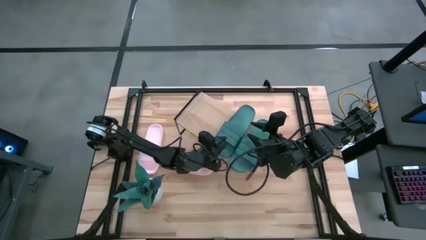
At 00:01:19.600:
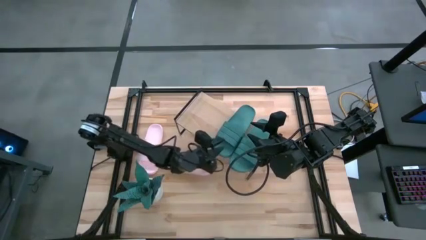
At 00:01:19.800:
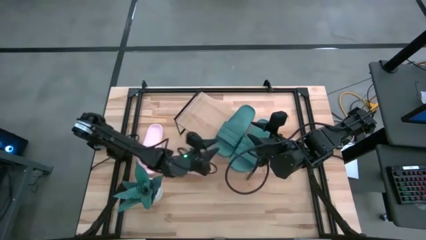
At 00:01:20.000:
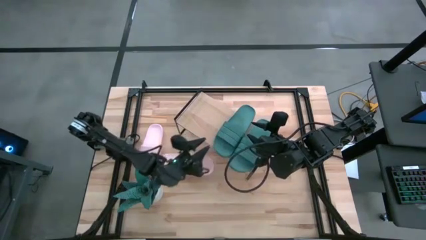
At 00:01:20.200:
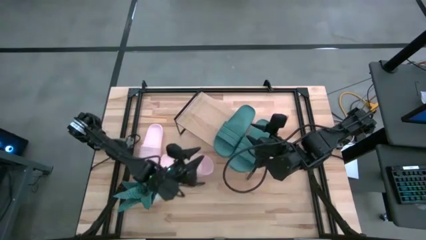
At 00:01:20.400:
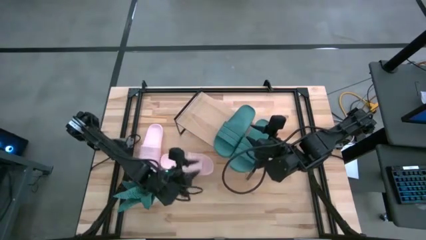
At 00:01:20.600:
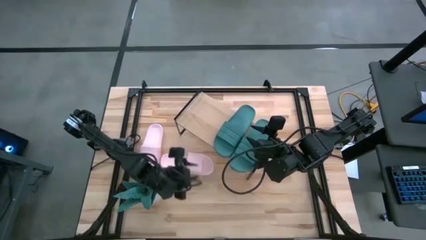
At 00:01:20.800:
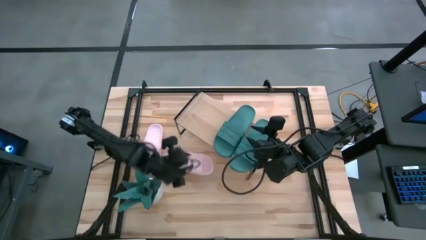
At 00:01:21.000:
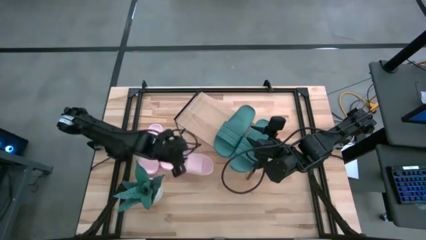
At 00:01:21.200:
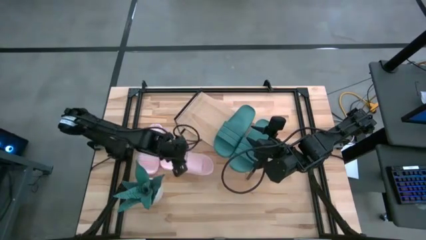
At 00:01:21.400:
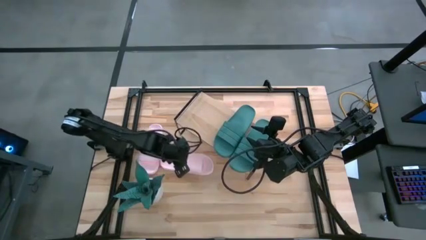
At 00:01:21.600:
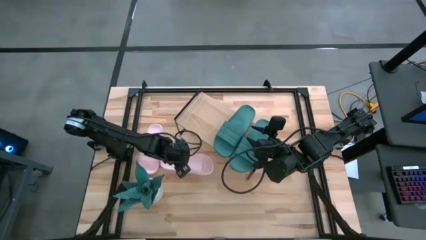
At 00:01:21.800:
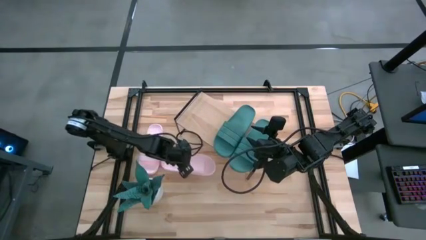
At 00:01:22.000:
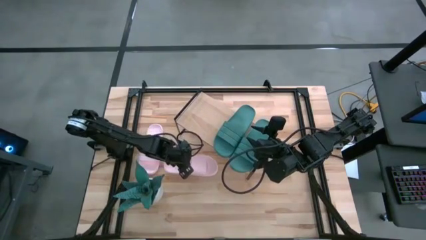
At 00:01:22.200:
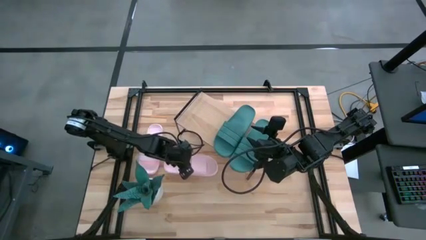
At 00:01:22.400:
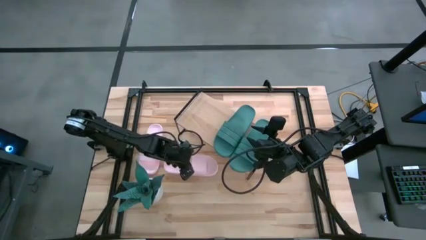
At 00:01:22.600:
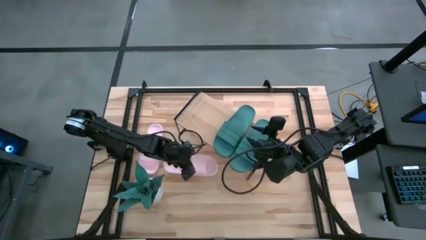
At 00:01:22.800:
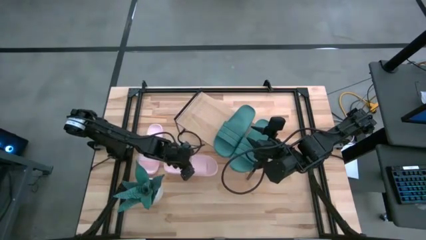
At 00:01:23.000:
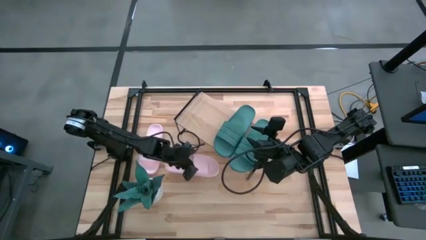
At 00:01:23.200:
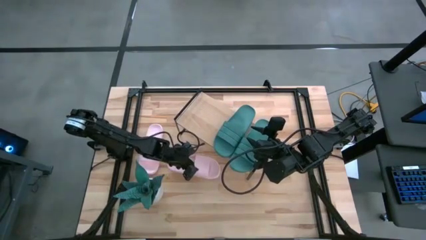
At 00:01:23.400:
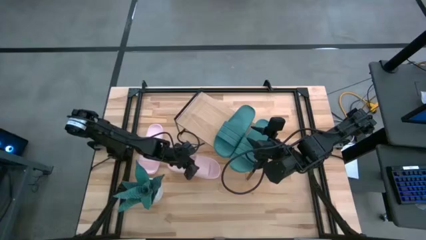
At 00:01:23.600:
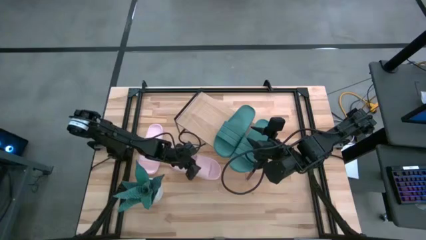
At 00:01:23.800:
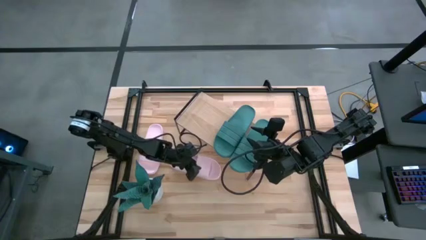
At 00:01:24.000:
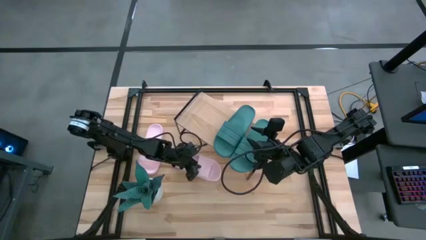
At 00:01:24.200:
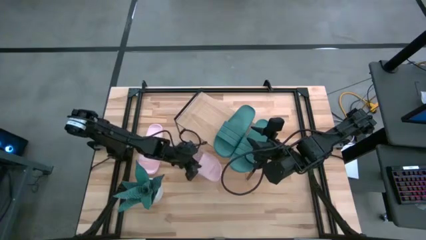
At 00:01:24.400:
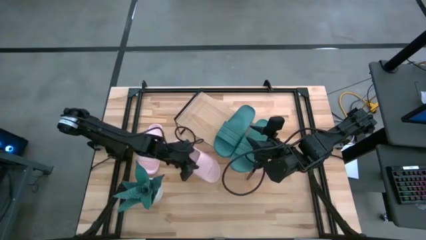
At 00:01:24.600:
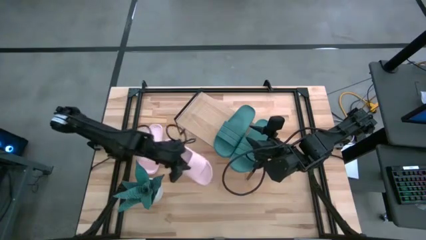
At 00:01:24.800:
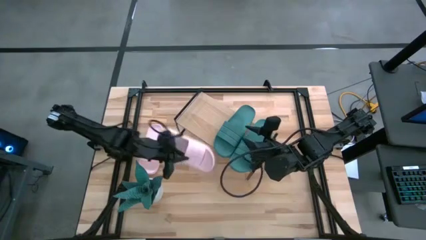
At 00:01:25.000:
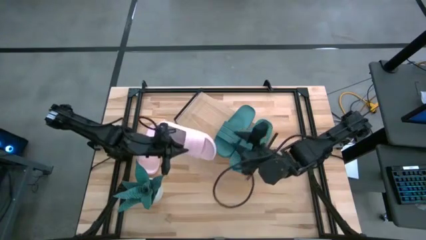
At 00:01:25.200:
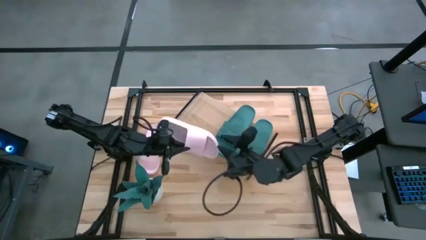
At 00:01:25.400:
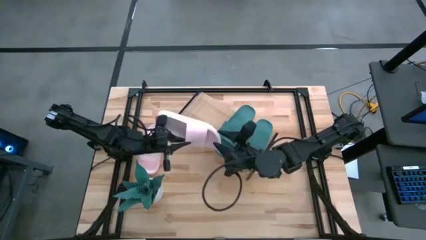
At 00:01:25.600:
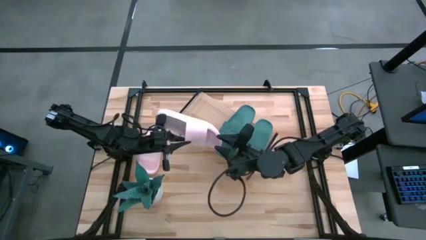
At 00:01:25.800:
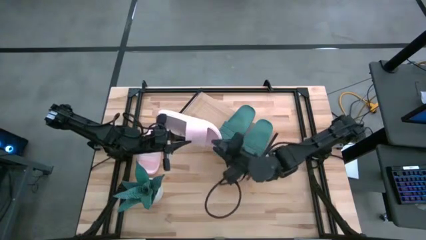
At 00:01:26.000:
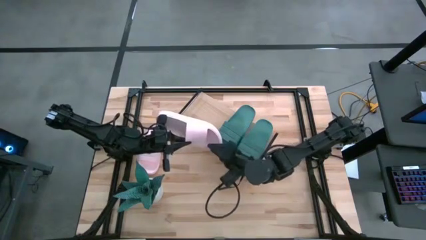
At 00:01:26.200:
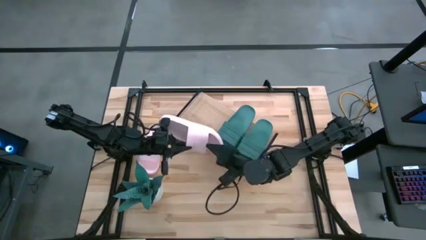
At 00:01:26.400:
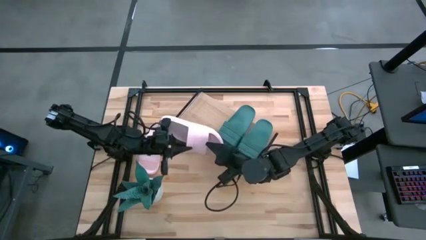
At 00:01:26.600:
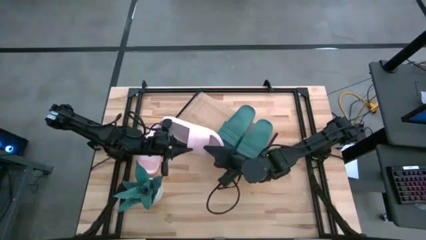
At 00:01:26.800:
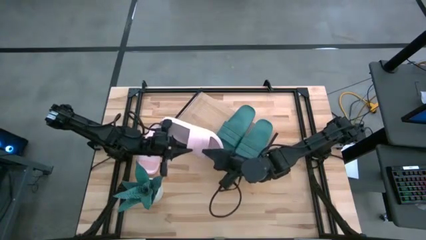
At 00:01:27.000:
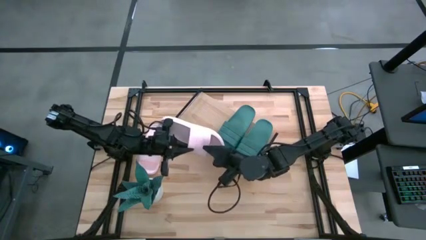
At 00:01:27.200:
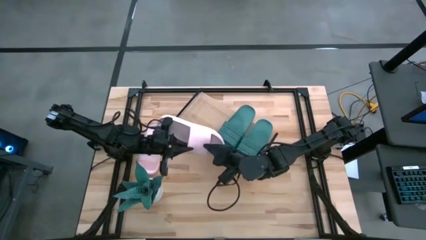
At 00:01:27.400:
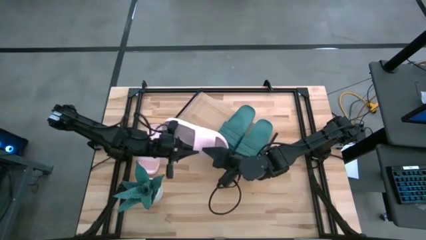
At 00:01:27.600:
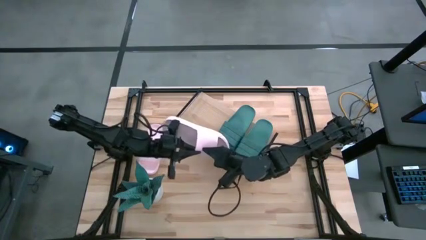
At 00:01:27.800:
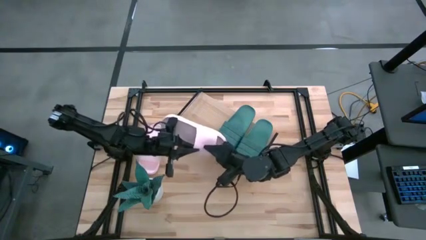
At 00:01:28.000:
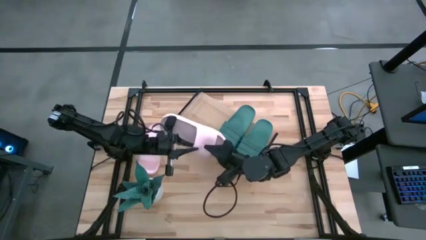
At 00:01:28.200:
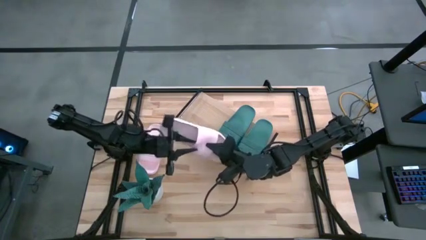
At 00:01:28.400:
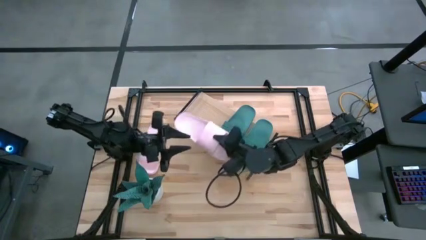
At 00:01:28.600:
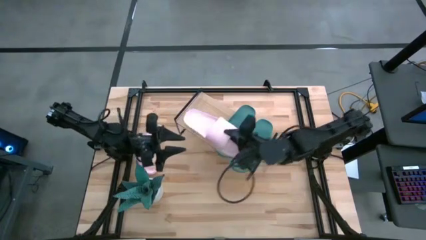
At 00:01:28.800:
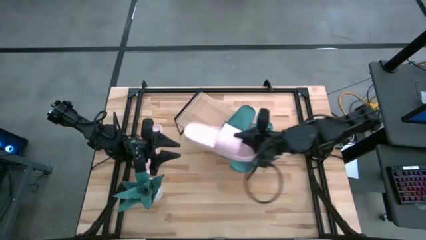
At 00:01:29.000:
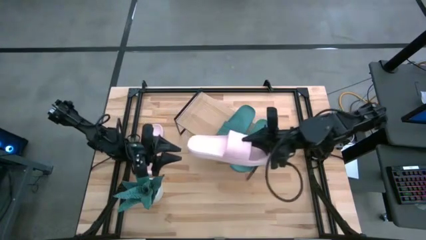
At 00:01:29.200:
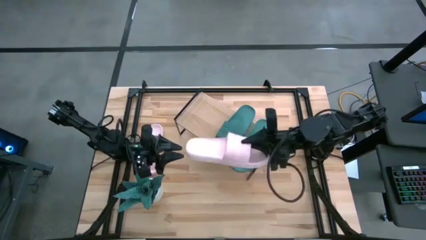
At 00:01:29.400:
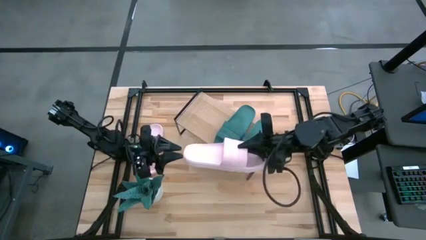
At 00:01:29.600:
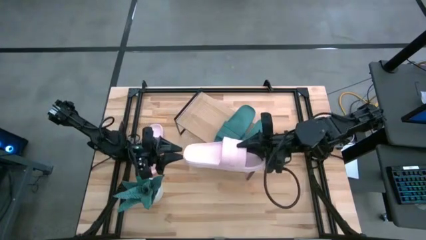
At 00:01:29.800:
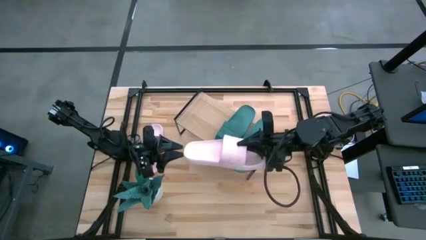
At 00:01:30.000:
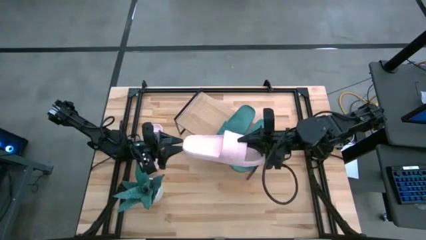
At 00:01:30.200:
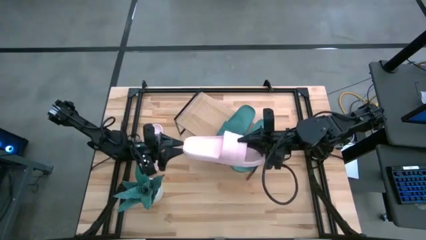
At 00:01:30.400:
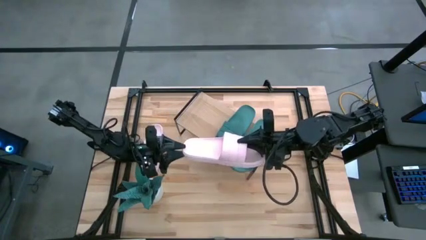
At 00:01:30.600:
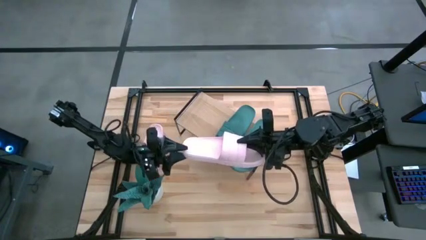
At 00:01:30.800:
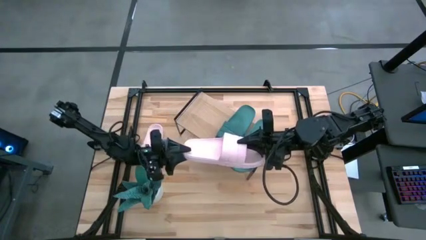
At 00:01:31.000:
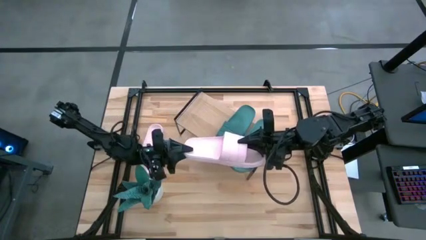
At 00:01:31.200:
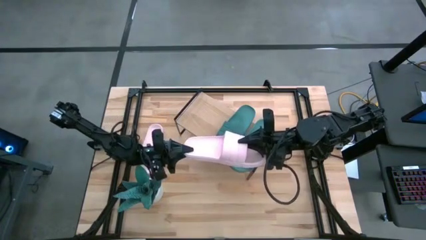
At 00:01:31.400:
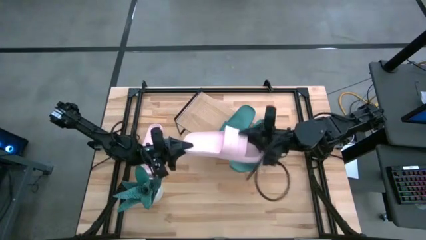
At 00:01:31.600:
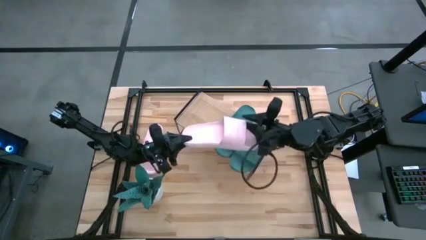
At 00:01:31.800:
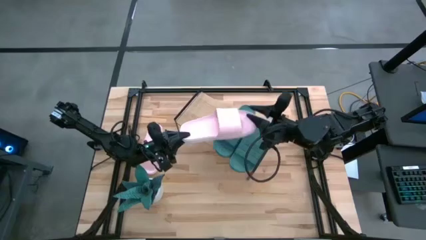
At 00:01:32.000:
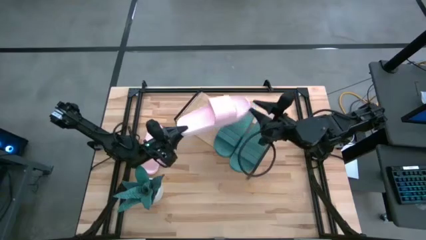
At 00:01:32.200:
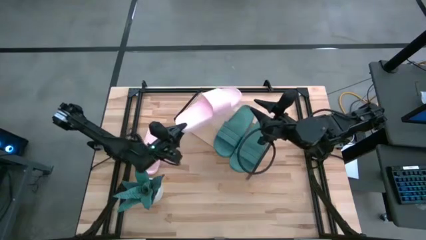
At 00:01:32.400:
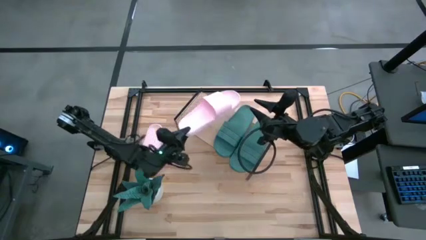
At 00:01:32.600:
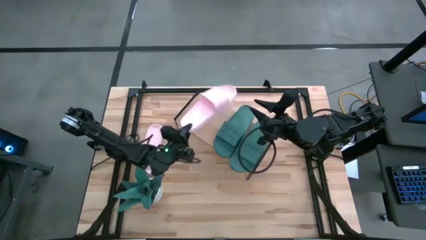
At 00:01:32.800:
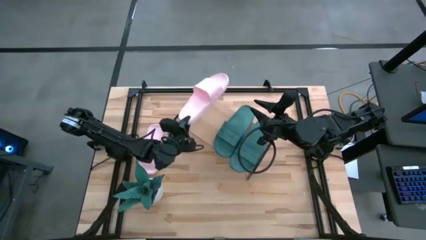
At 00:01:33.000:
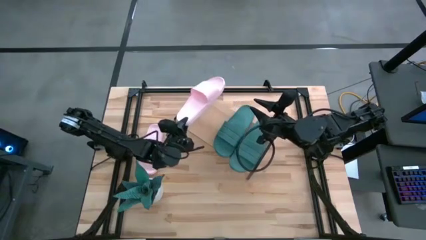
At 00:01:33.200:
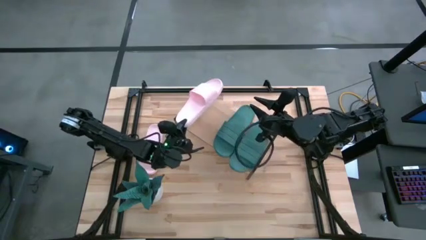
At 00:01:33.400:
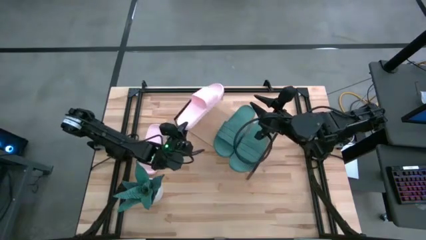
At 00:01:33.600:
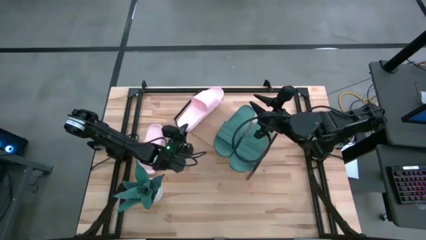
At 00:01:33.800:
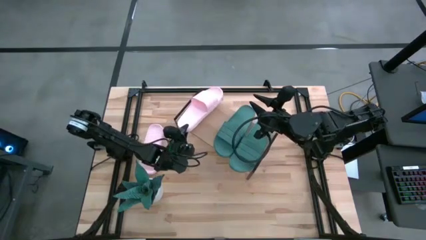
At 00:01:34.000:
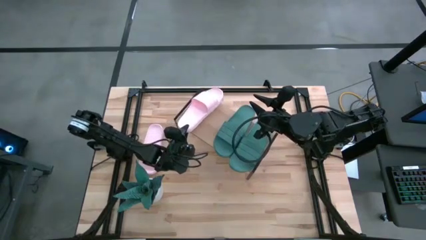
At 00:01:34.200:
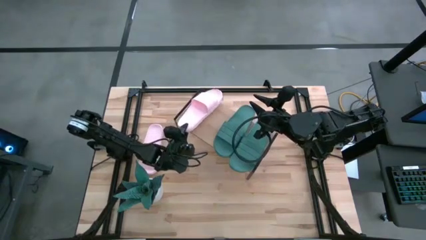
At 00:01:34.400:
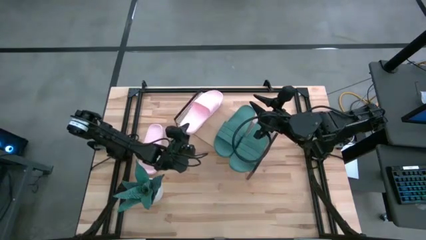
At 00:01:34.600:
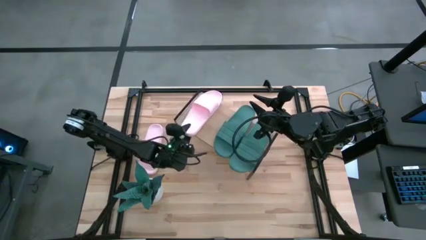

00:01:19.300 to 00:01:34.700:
Task: Pick and place slides into the shelf
Put the right pink slide on the shelf
